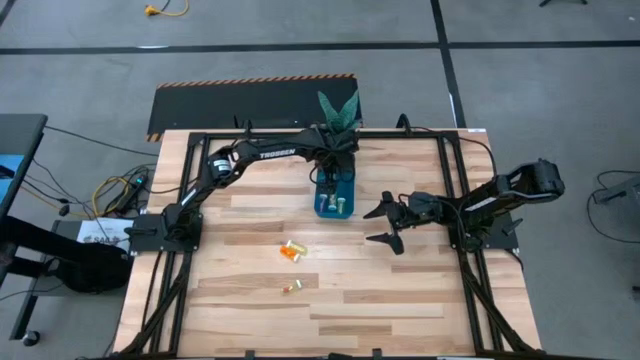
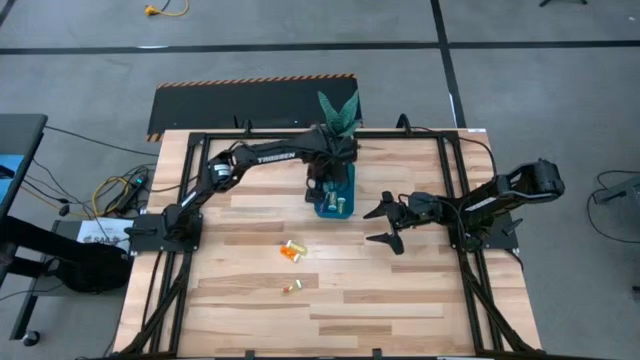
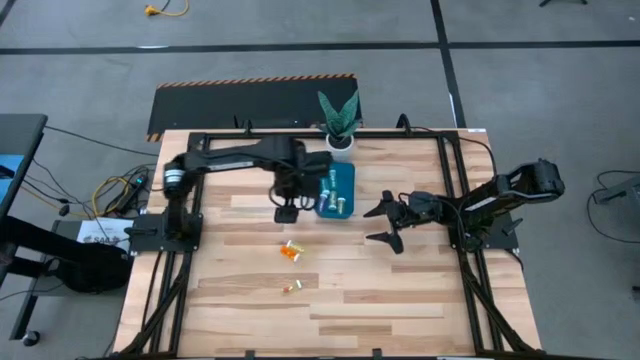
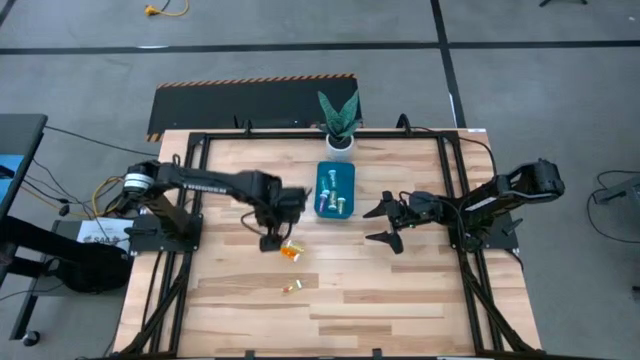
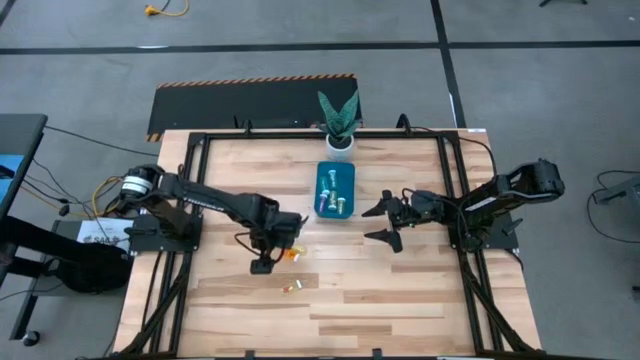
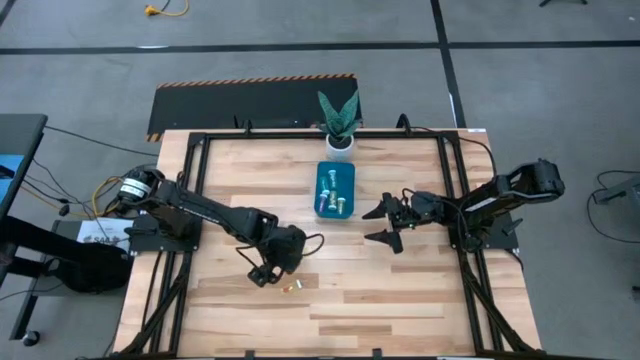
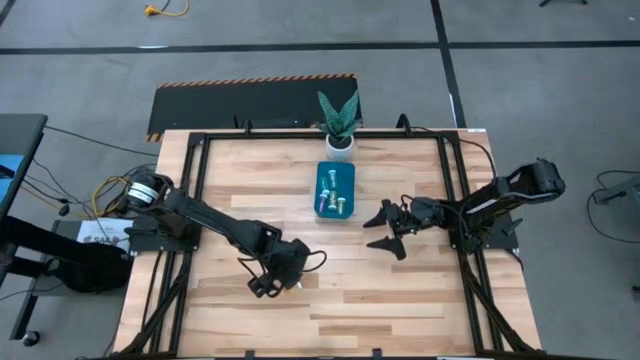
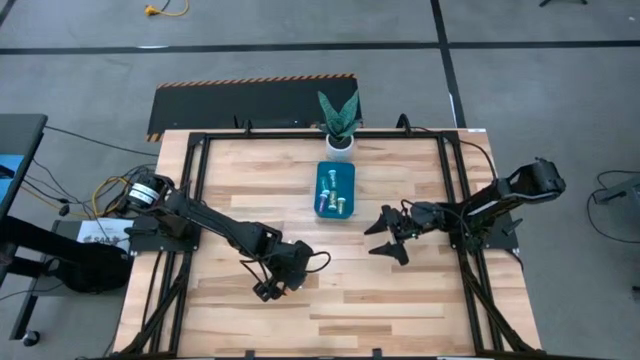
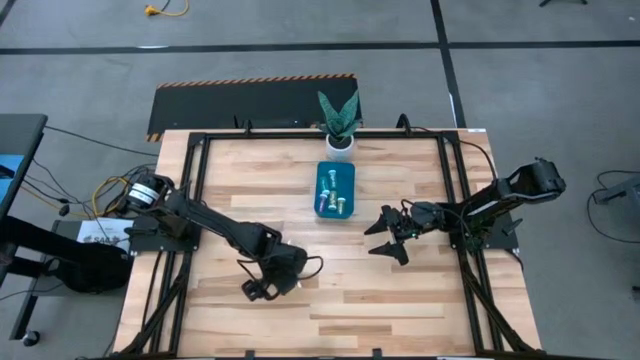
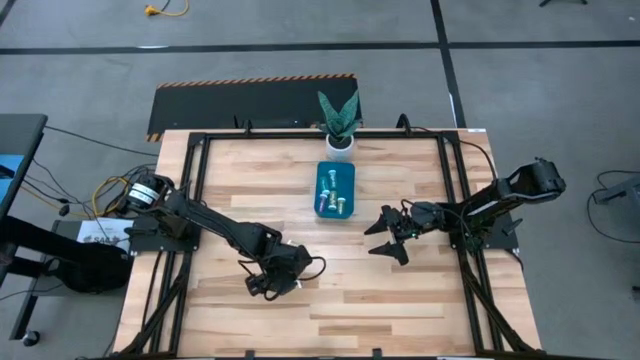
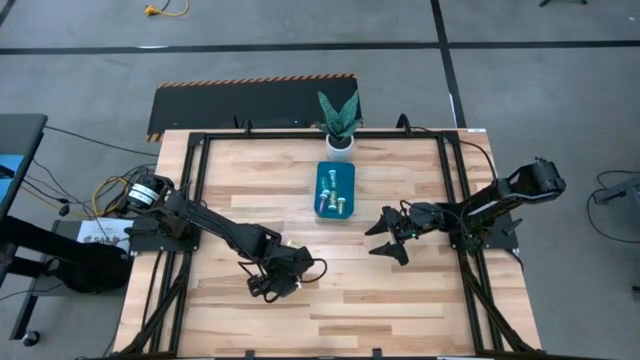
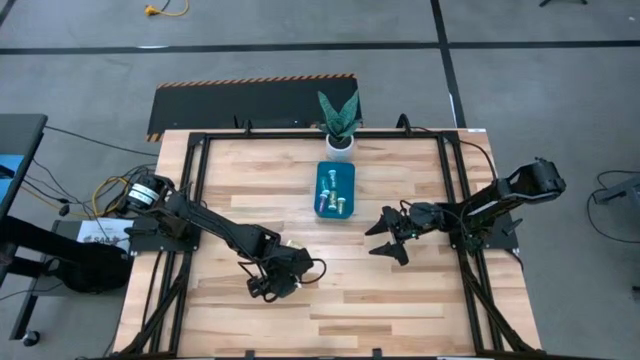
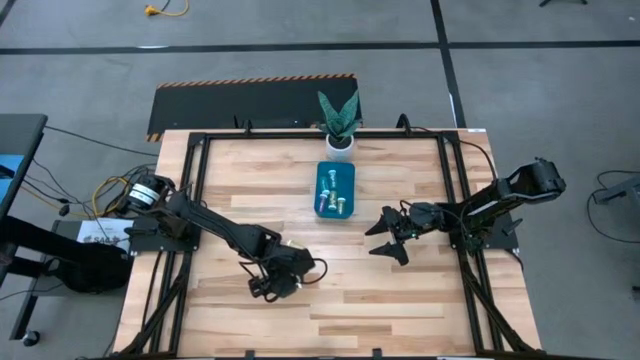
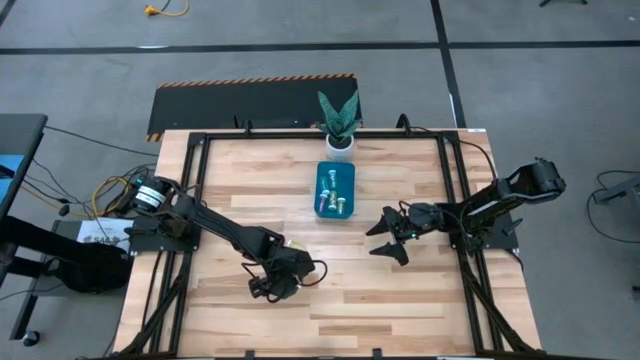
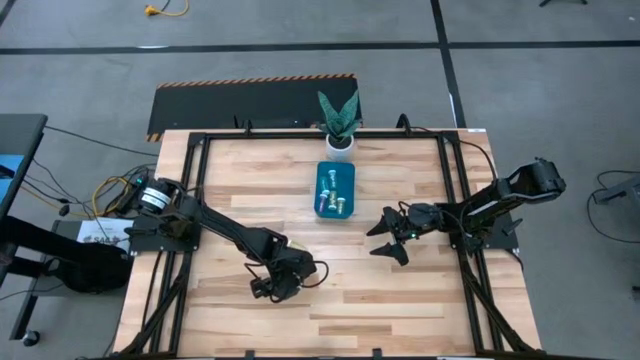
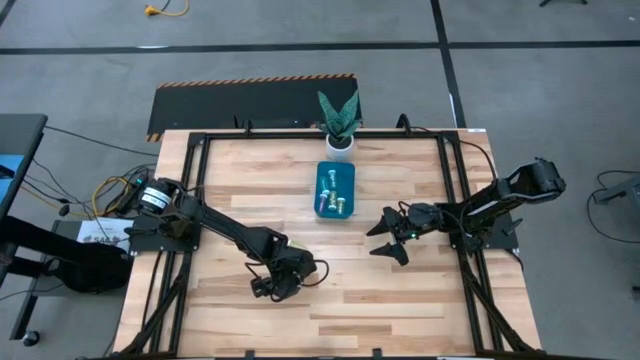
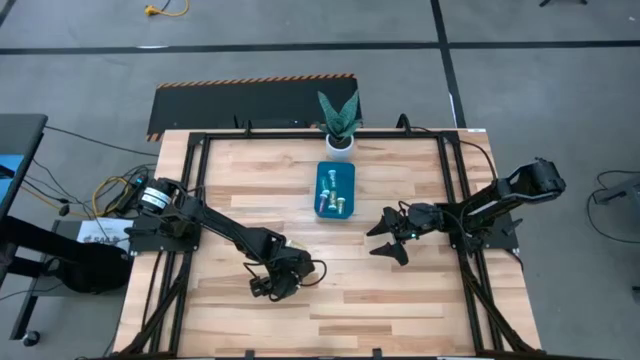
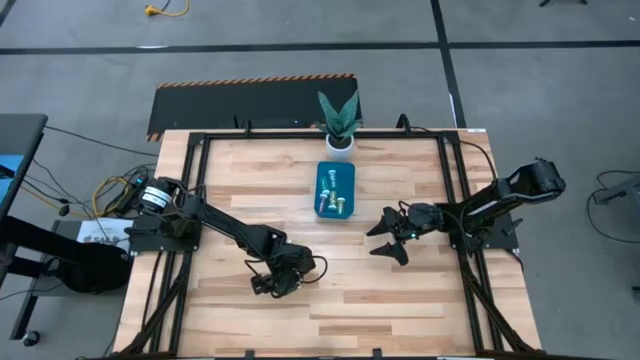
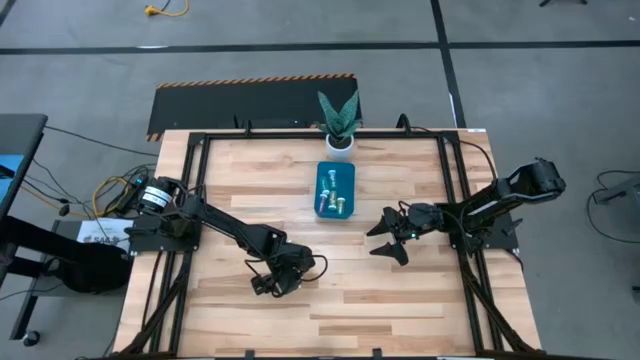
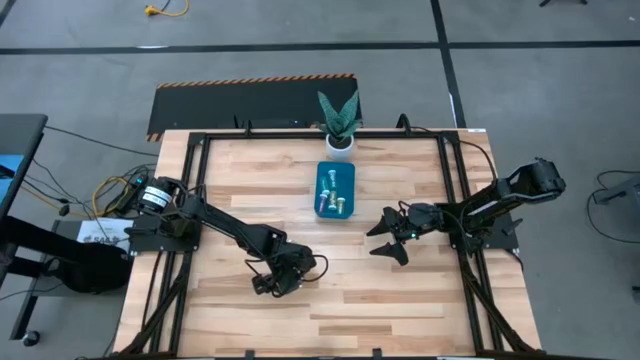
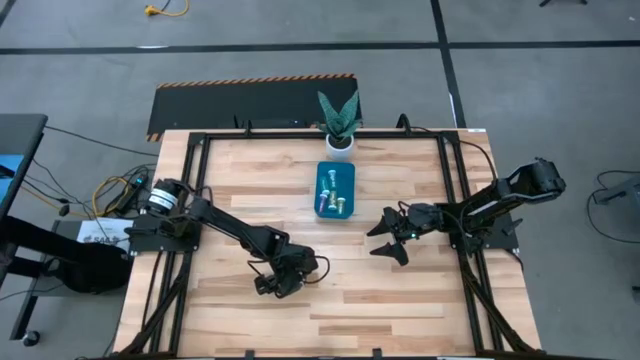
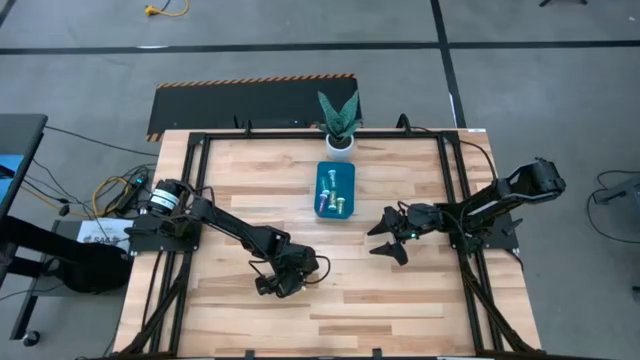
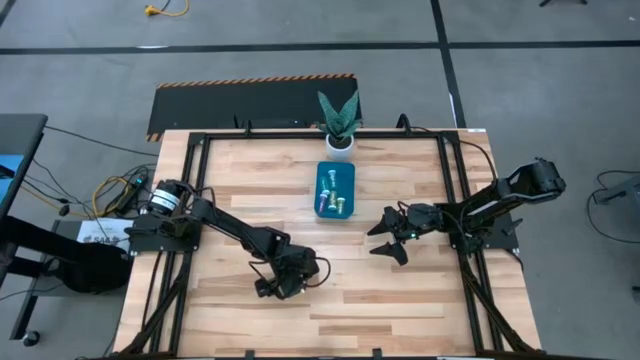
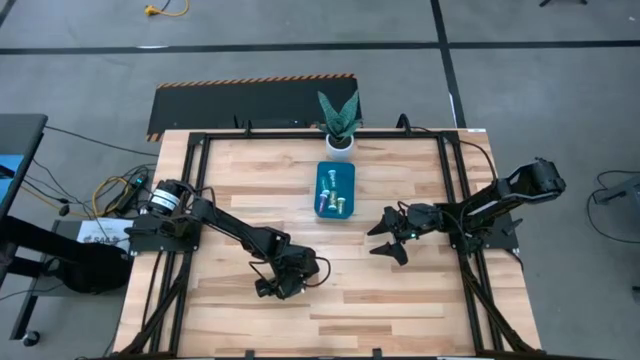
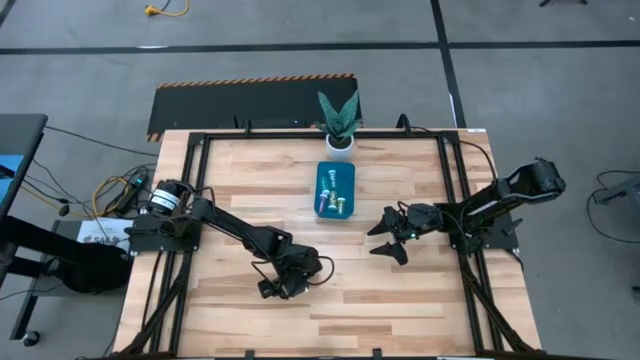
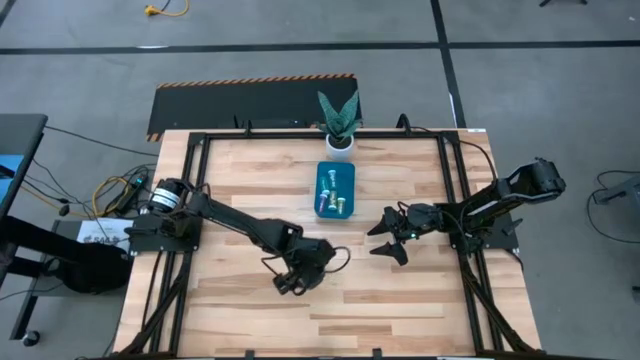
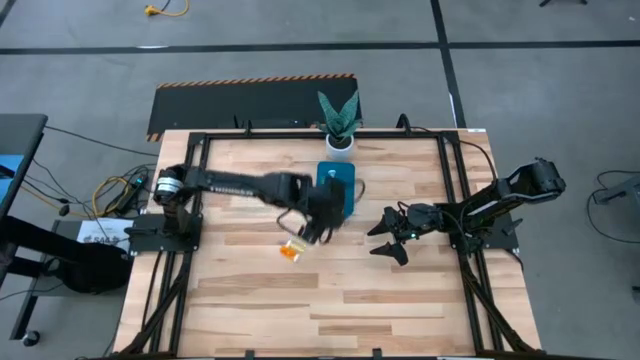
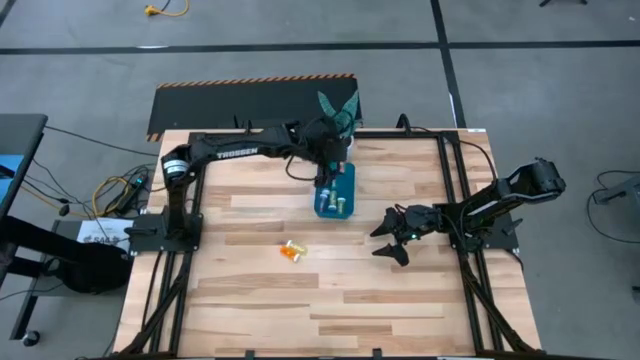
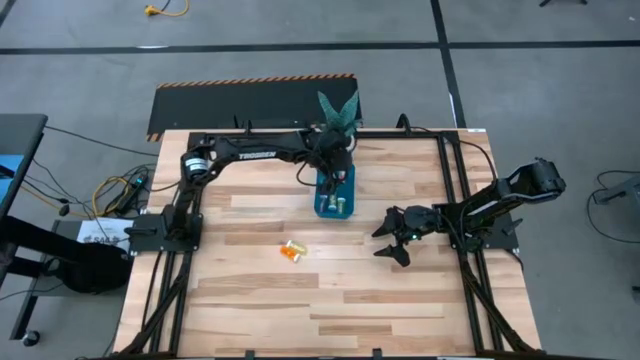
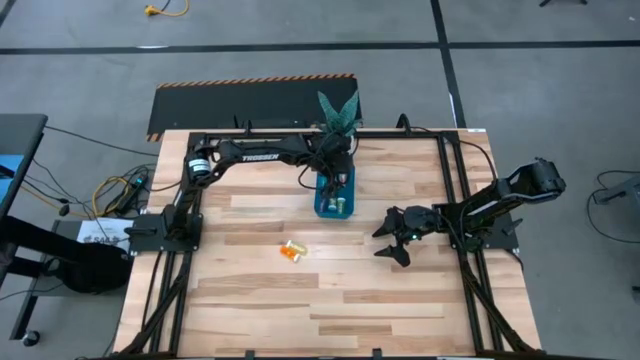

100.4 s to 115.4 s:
Task: Pick and place pill bottles into a basket
Put the bottom yellow pill bottle into the bin

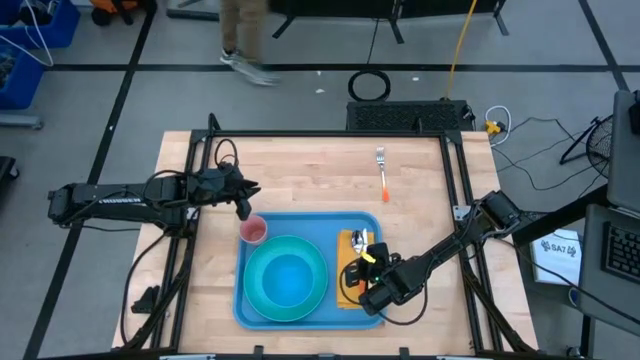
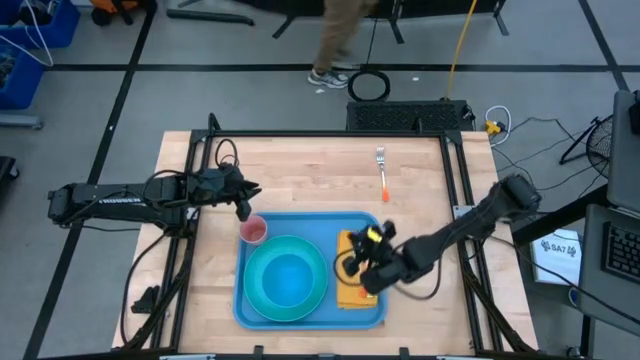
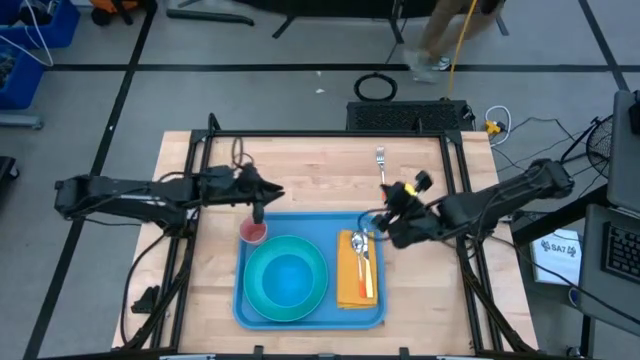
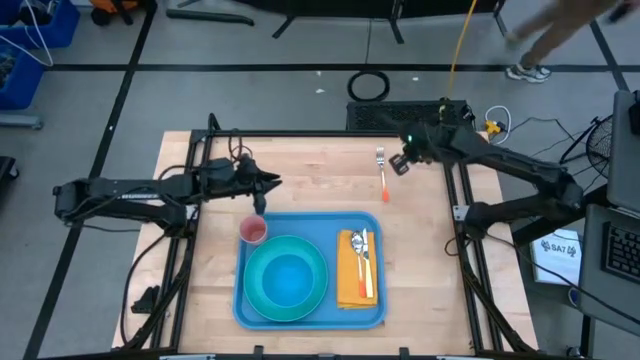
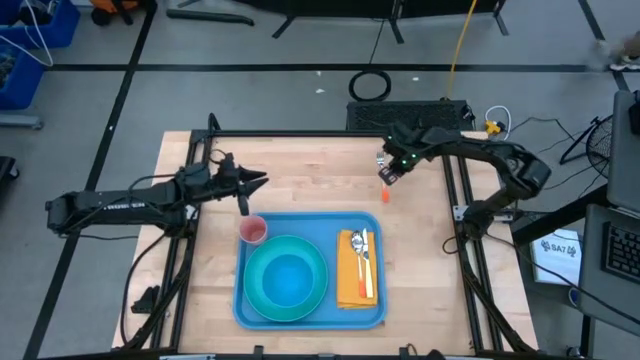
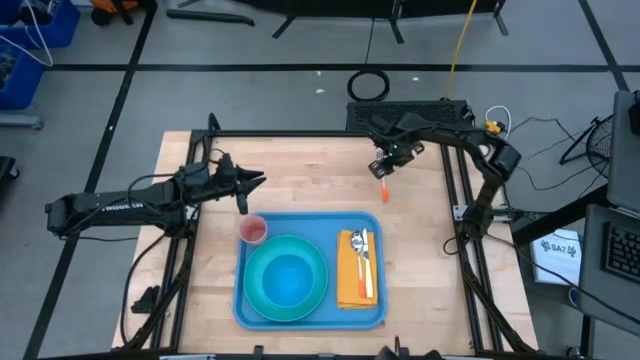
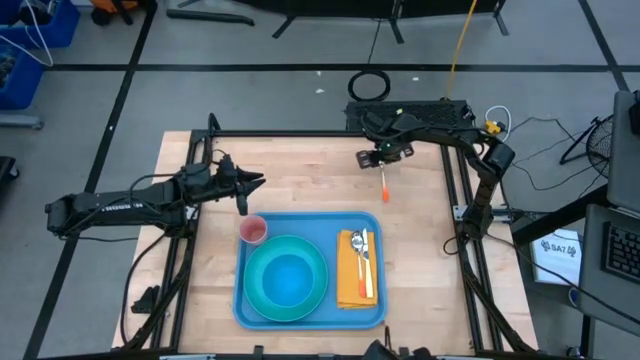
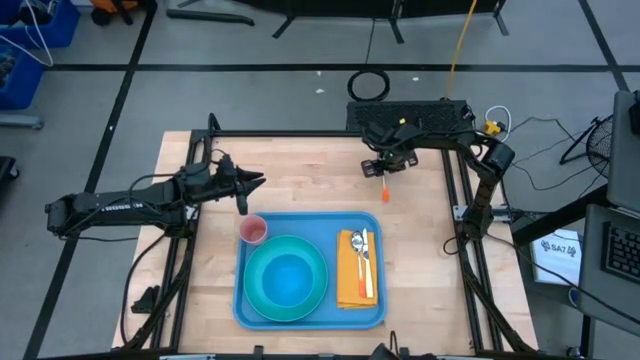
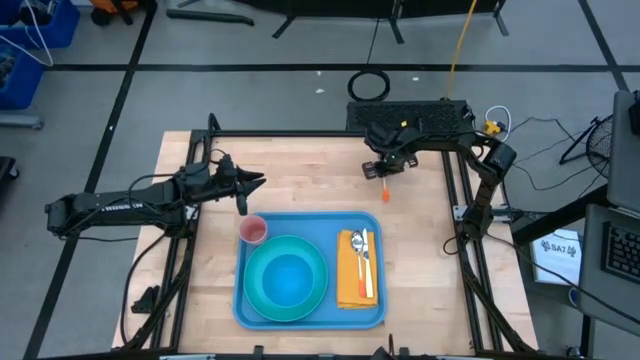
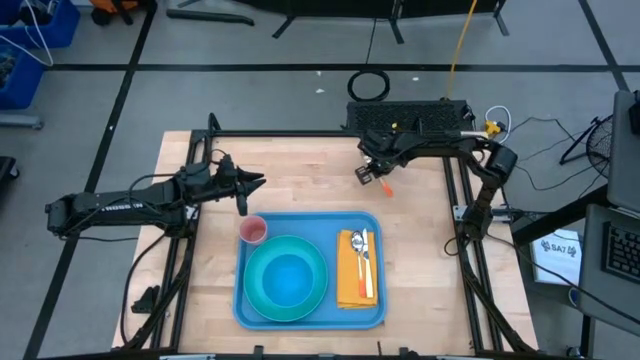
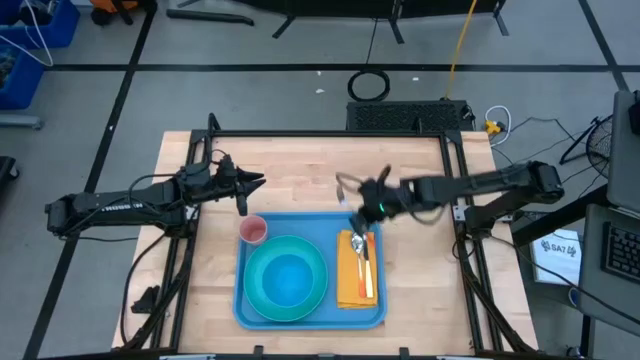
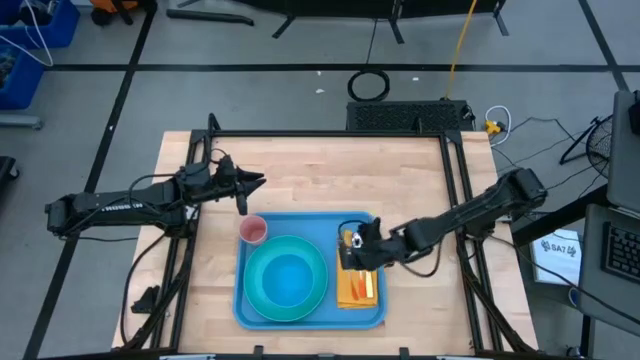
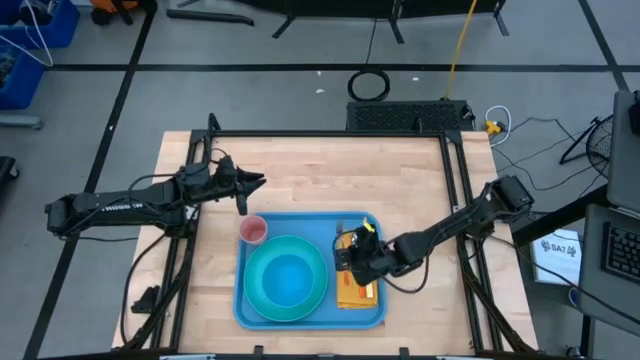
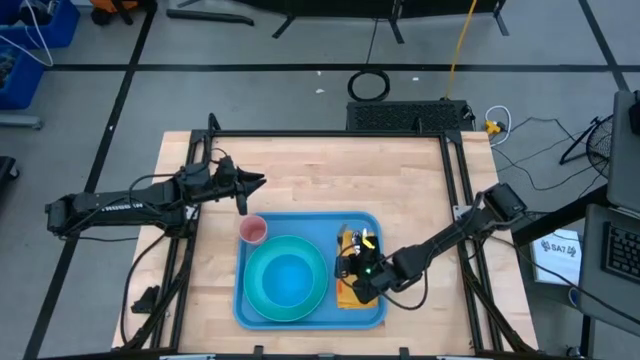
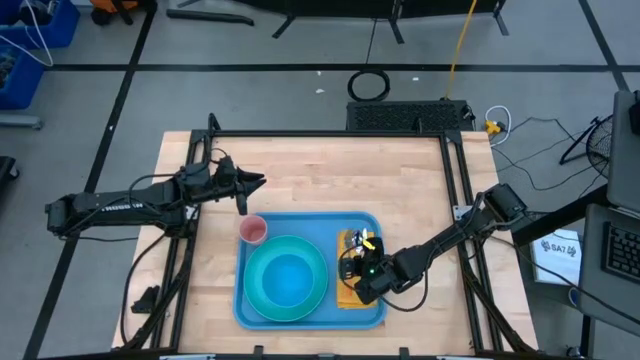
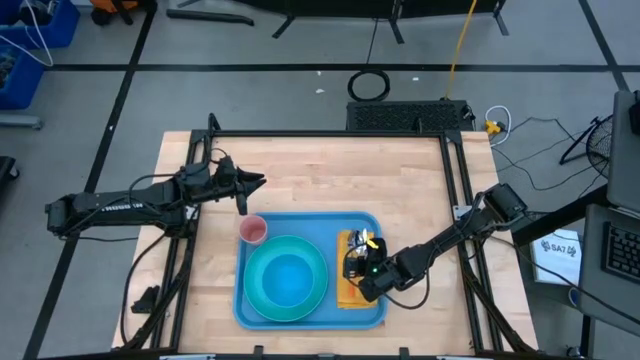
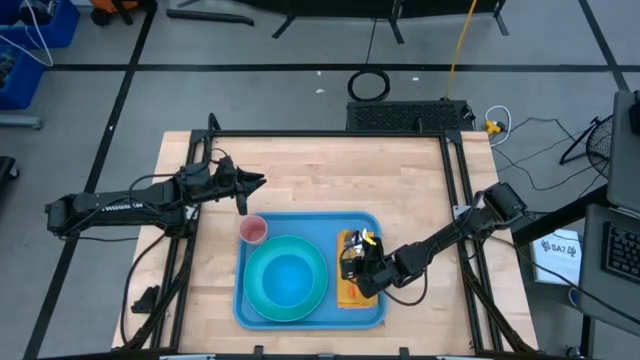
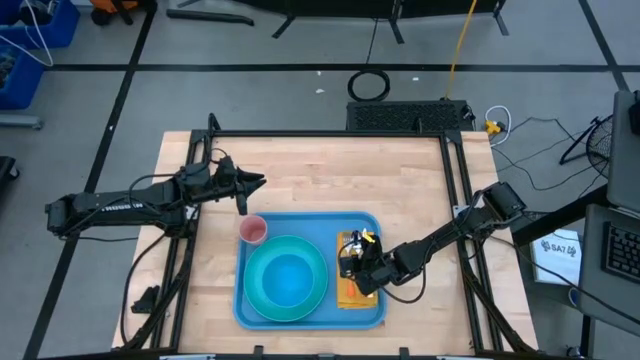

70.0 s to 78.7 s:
Task: Set up tray
Put the orange fork on the yellow napkin to the left of the orange spoon
